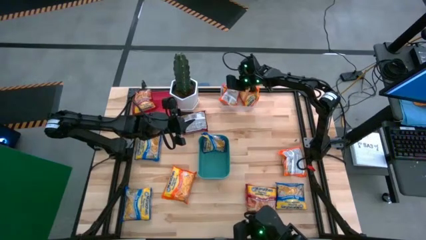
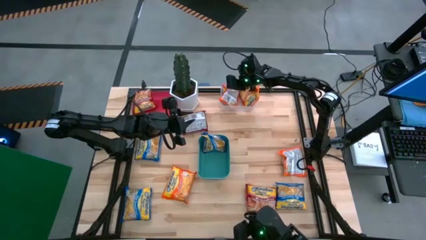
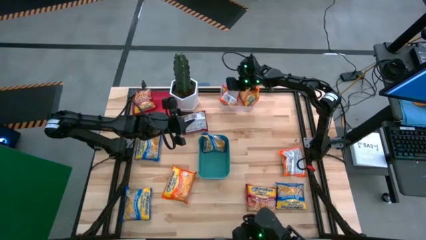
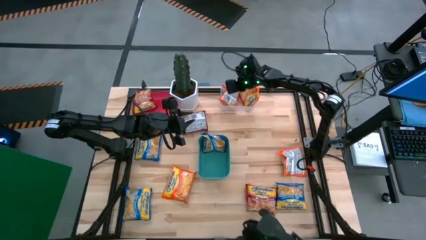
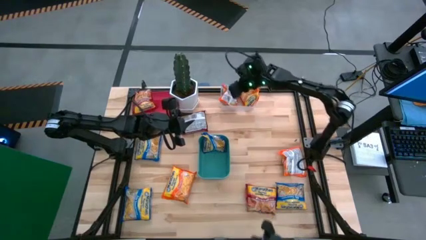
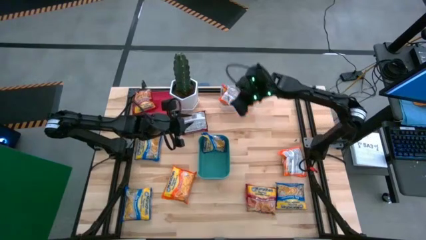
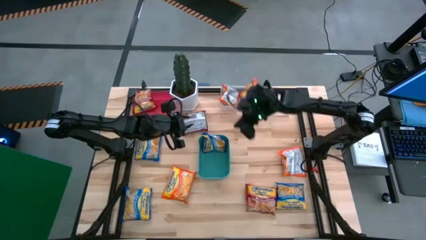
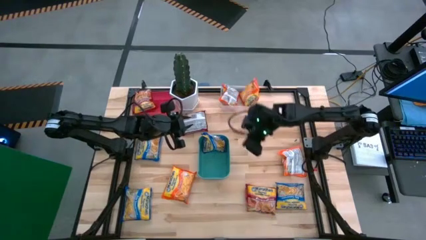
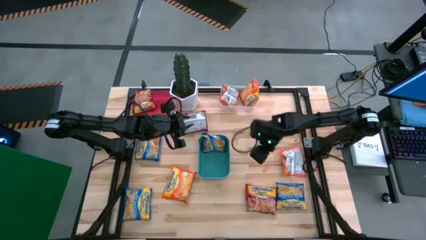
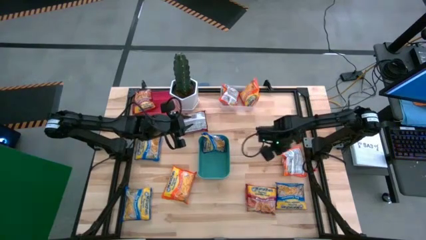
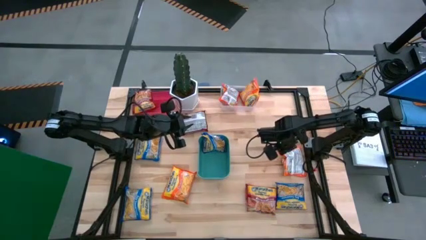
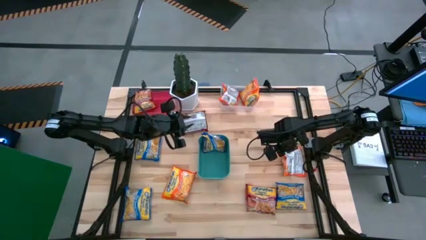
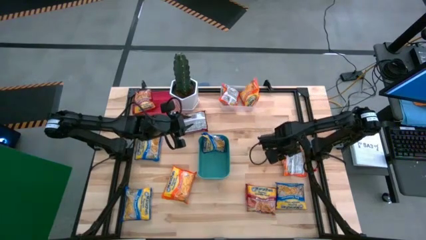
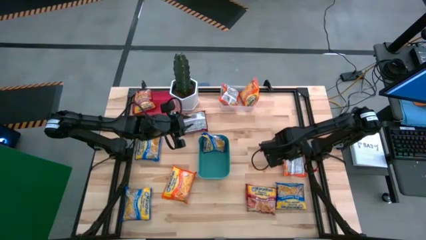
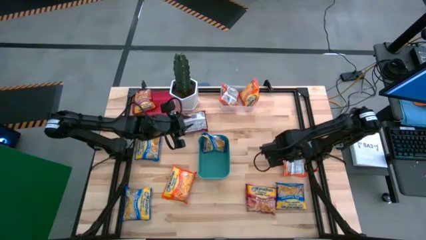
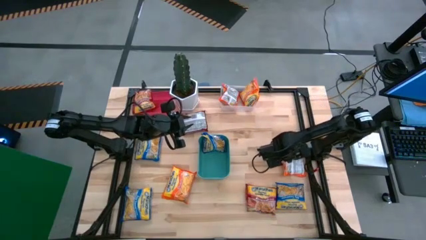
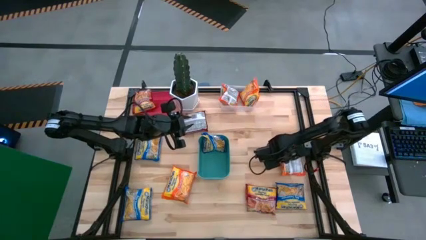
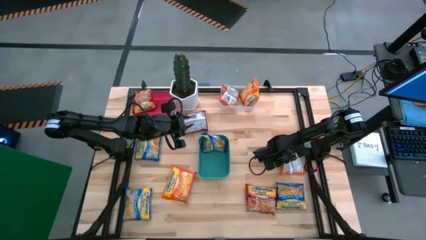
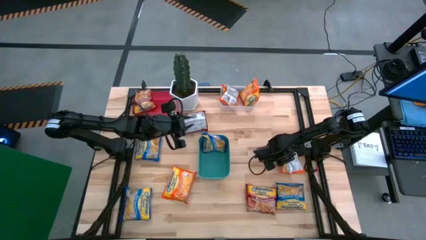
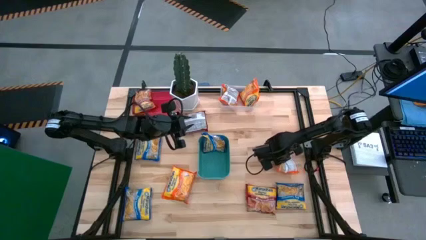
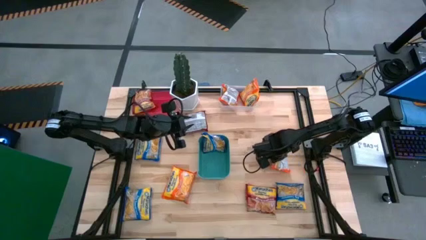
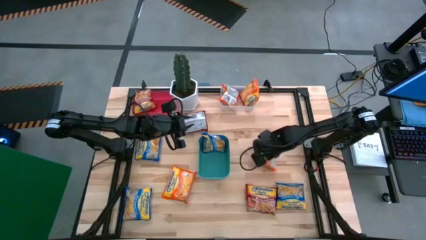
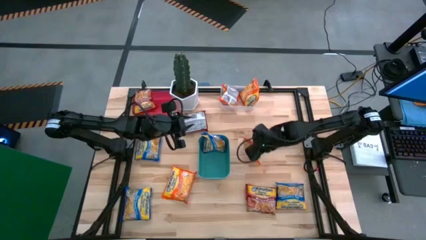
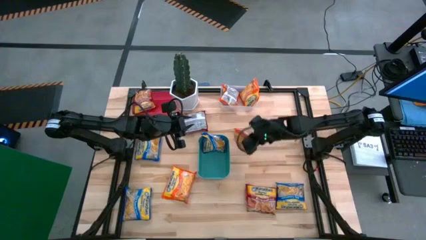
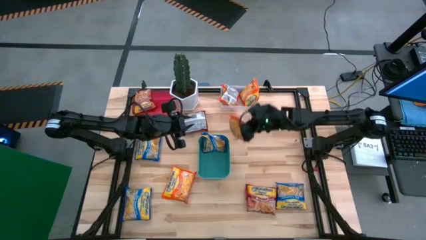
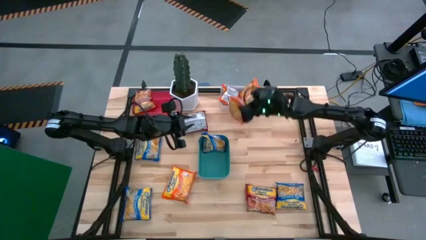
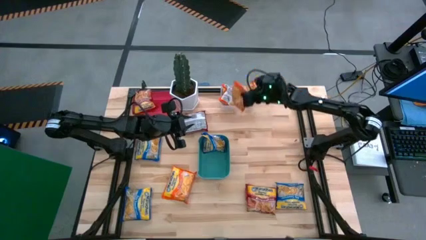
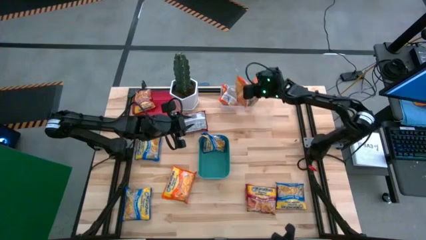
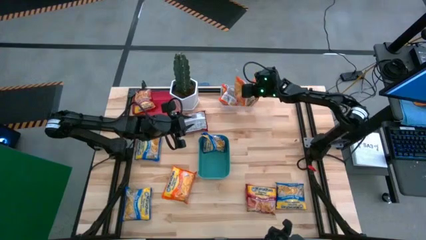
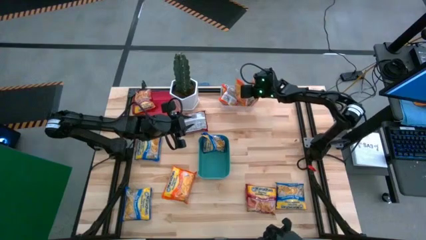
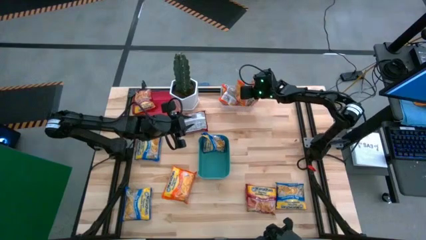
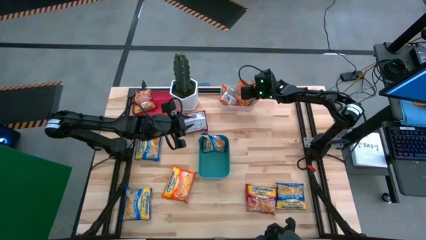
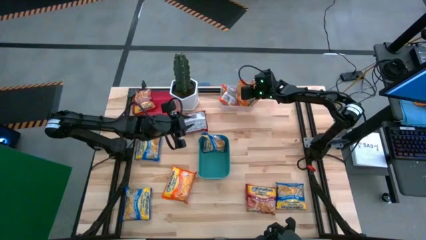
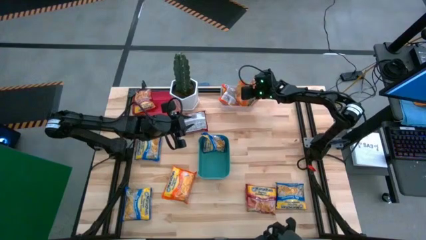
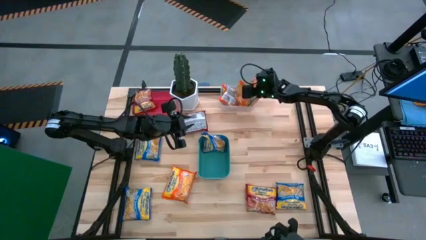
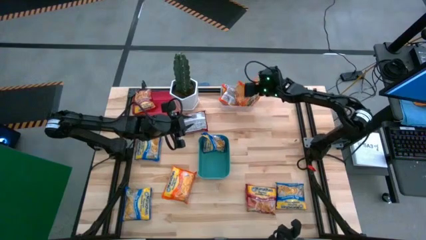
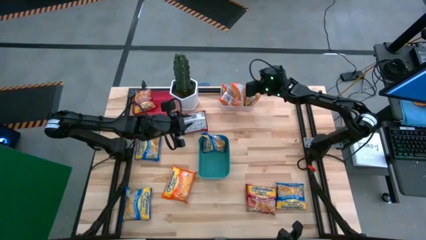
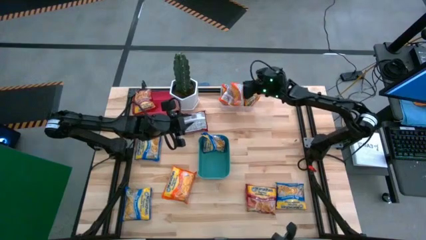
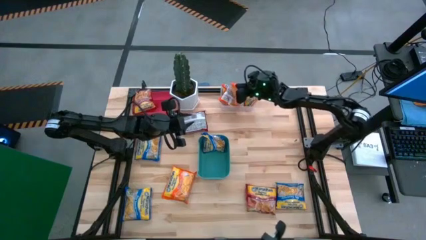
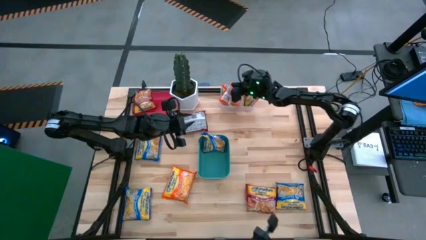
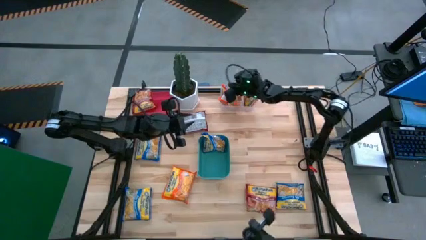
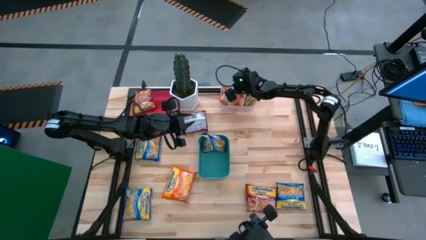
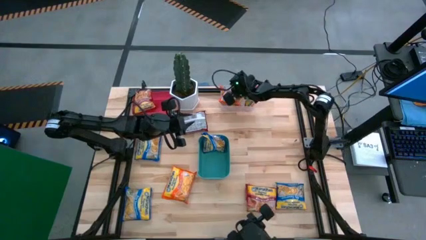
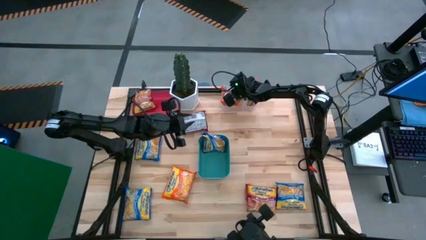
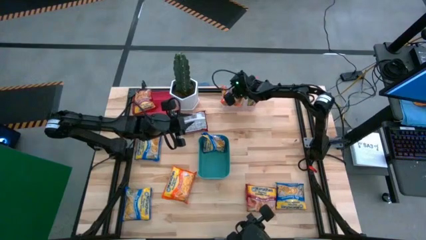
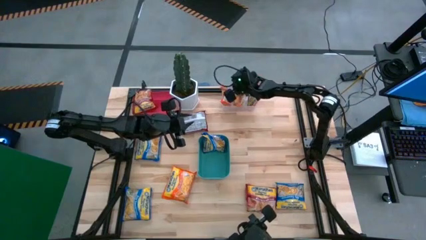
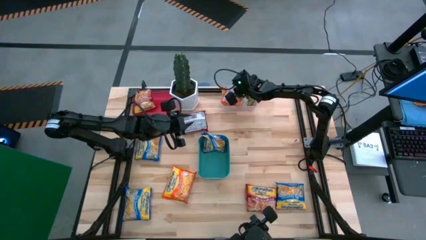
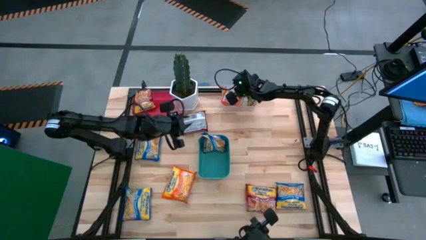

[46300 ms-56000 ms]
Task: Sort Maruchan noodles
Put the orange noodle pack into the transparent bin

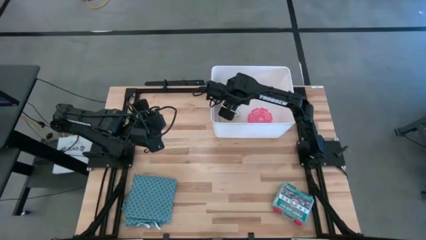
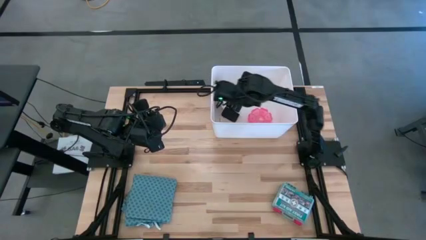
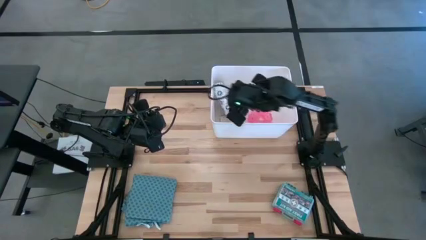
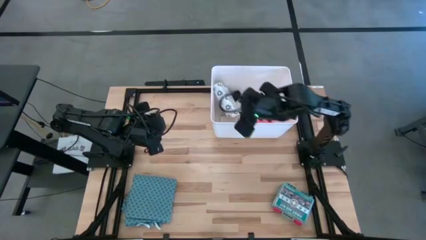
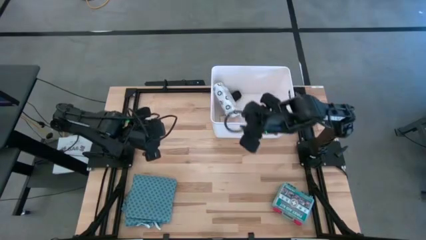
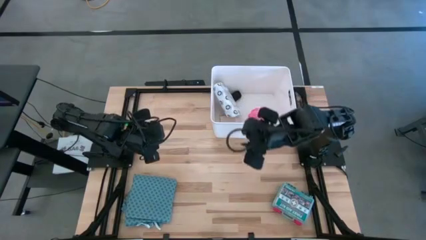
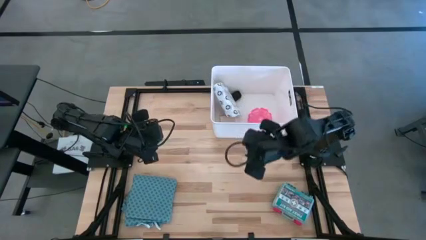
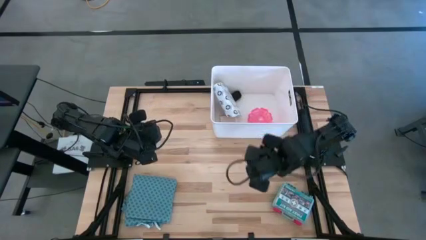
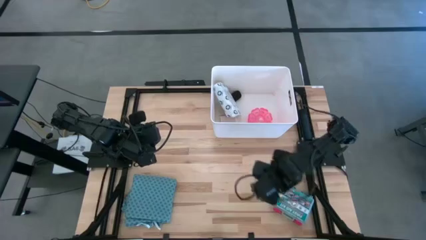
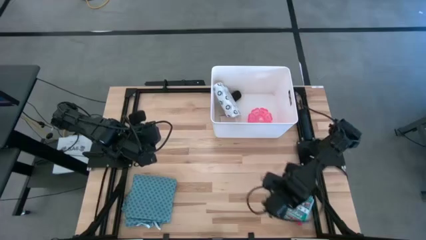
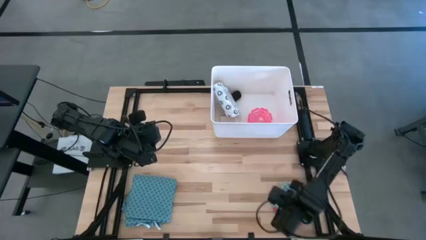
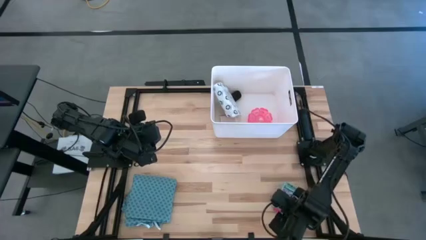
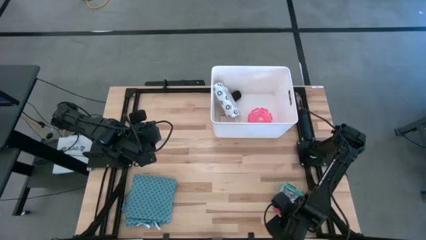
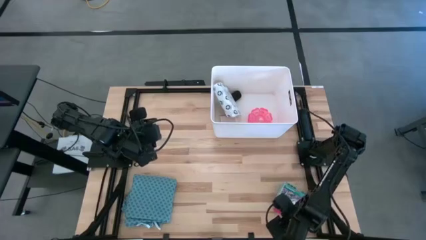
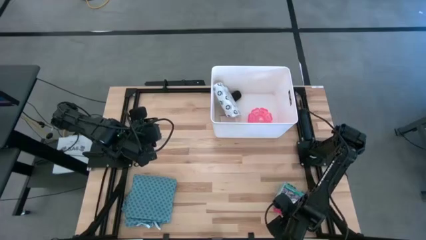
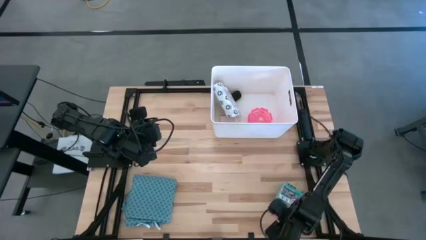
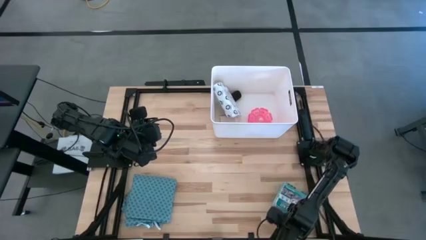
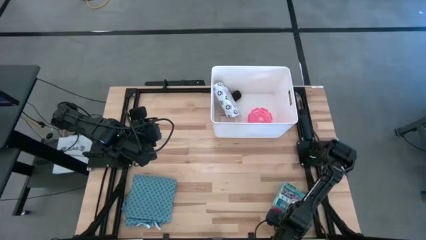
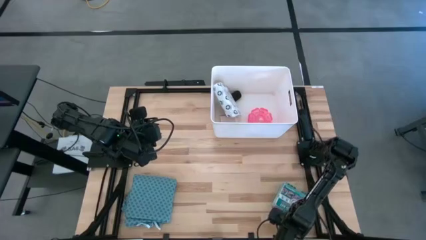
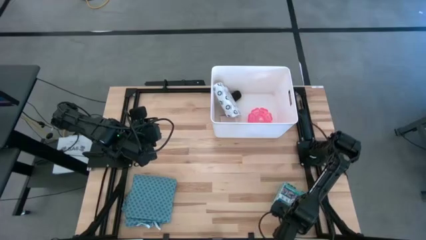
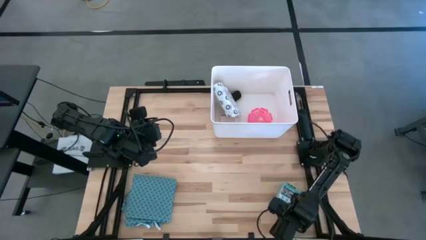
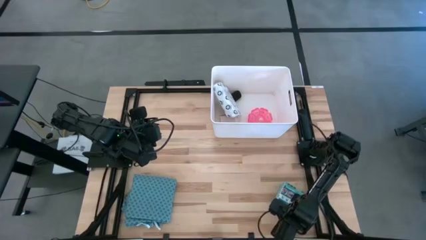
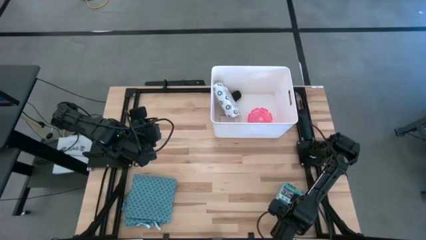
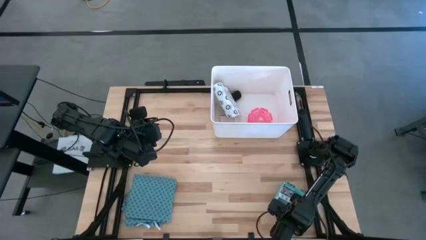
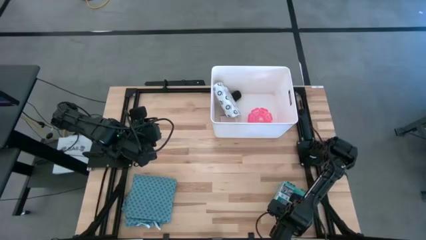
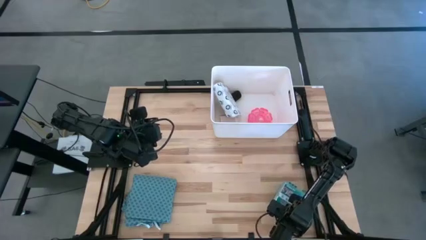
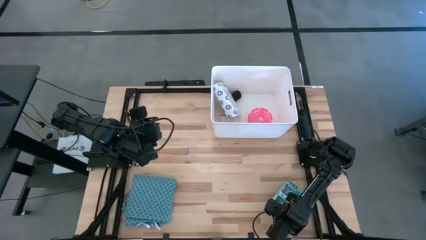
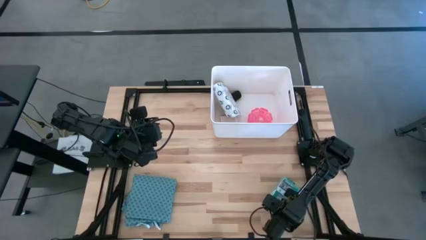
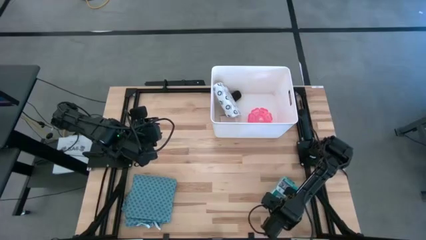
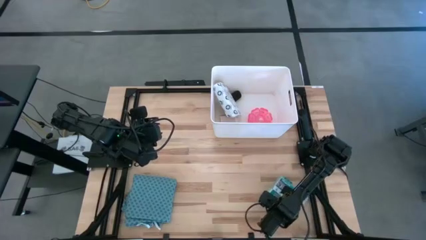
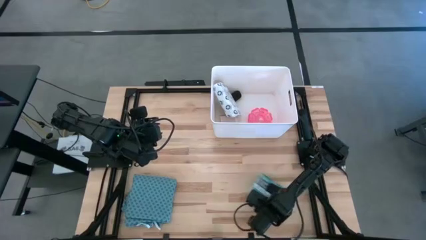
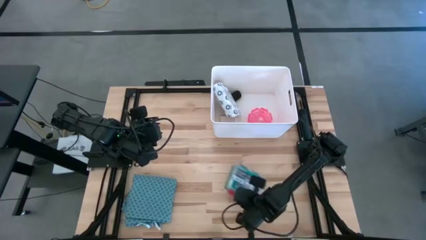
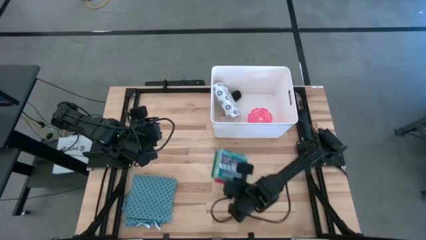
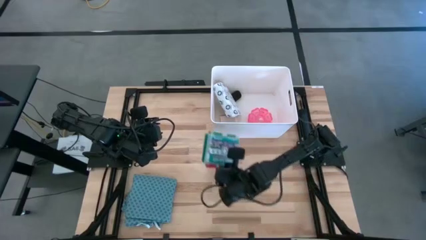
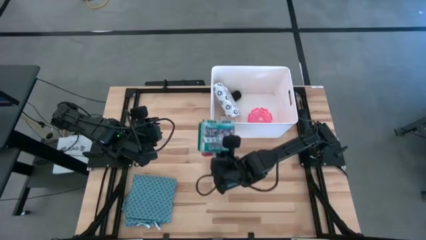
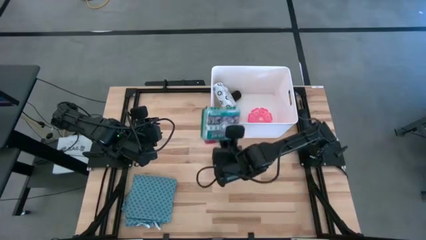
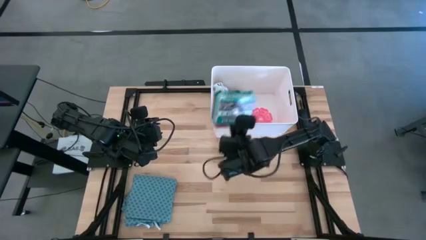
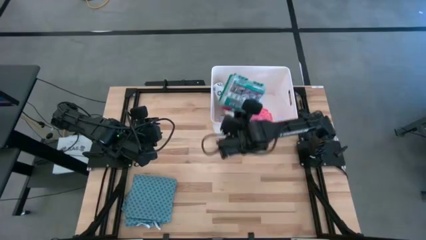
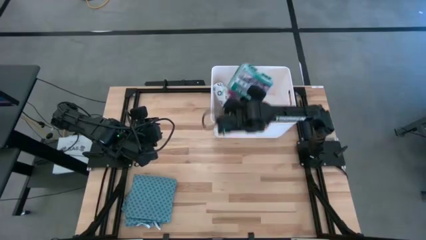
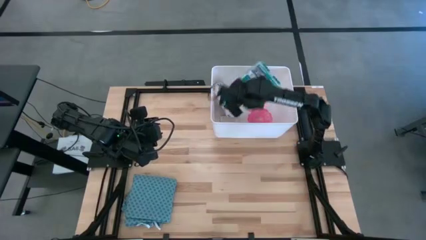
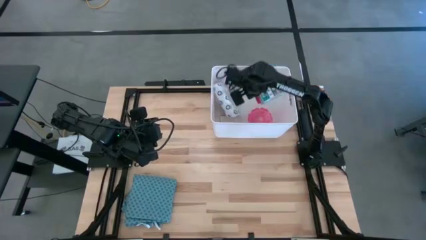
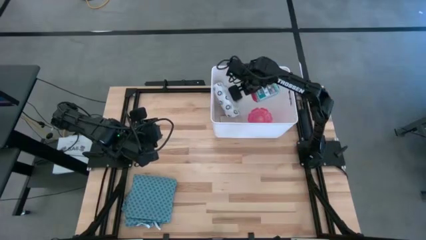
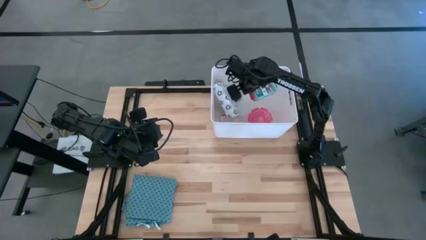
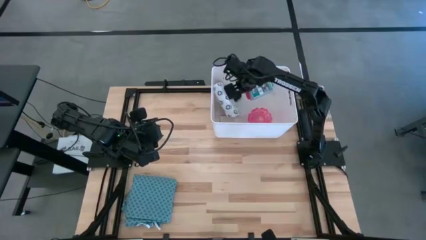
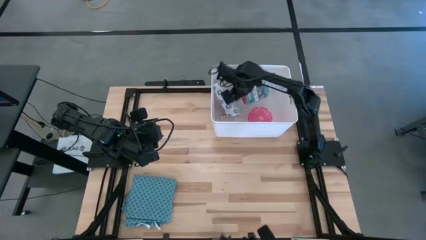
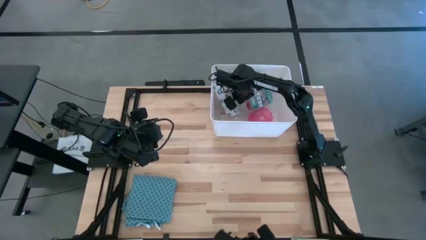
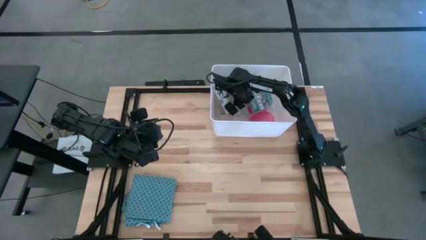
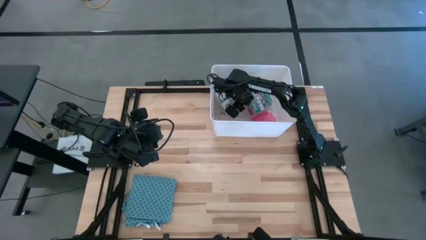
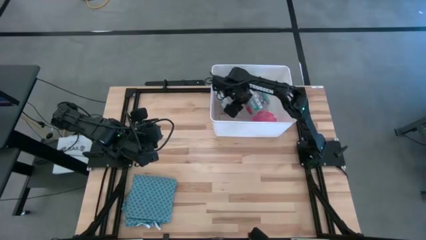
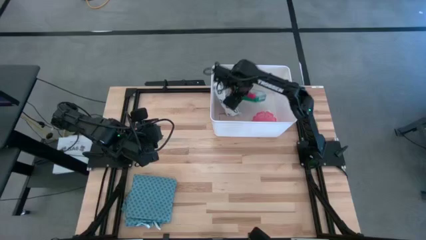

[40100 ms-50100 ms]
Task: Pick & place medical supplies in basket/bin
Put the green first aid kit in the white bin
